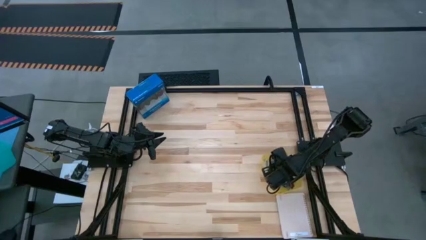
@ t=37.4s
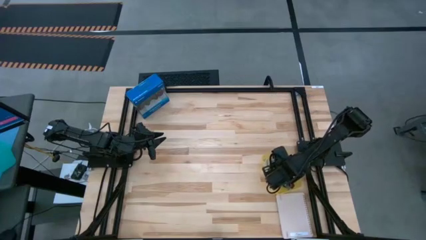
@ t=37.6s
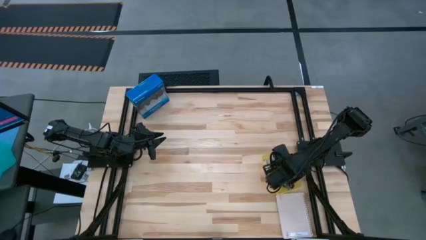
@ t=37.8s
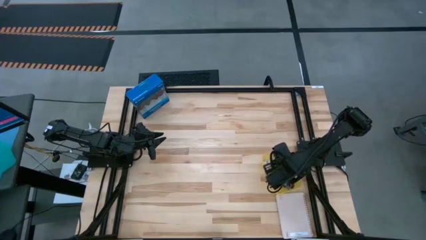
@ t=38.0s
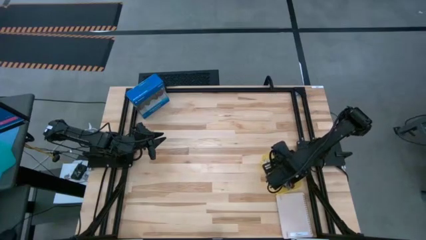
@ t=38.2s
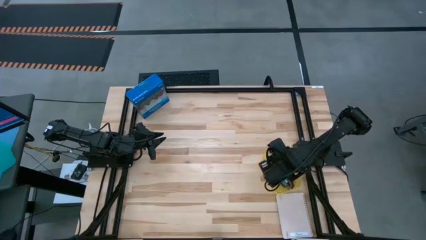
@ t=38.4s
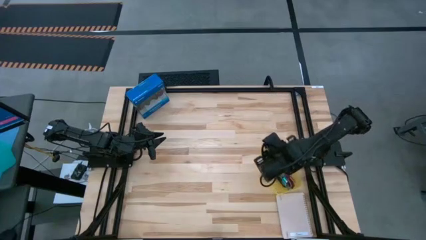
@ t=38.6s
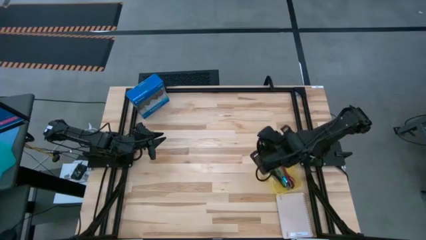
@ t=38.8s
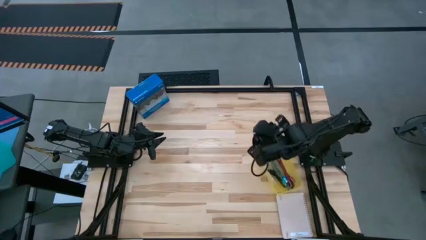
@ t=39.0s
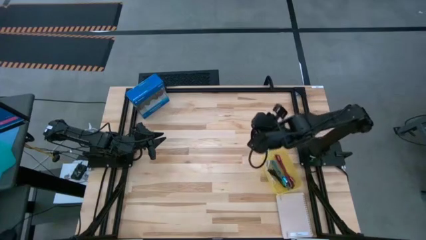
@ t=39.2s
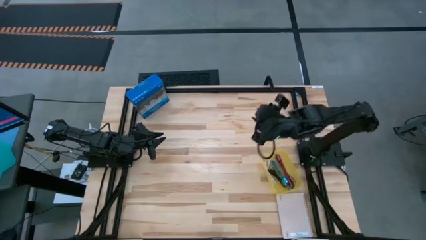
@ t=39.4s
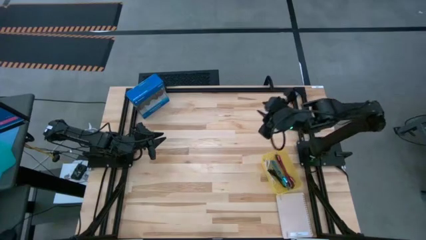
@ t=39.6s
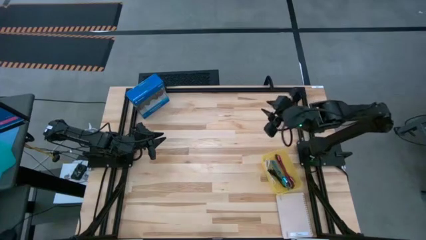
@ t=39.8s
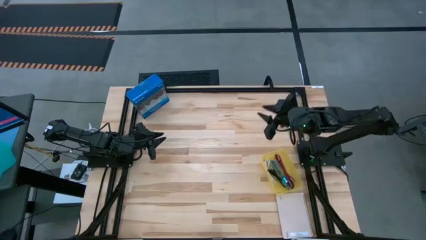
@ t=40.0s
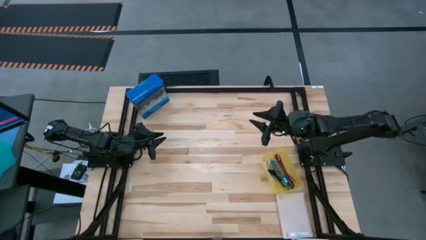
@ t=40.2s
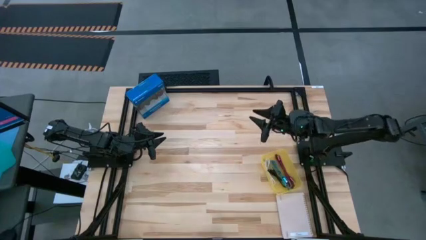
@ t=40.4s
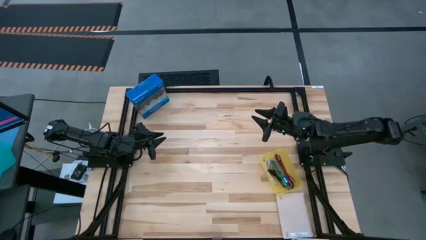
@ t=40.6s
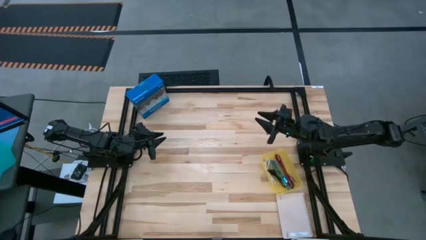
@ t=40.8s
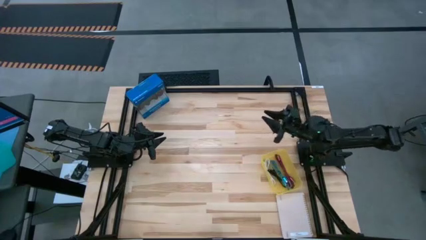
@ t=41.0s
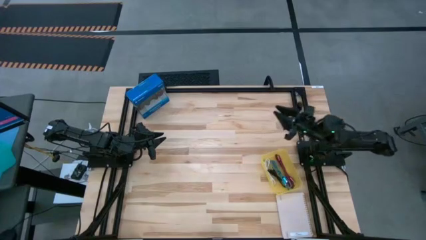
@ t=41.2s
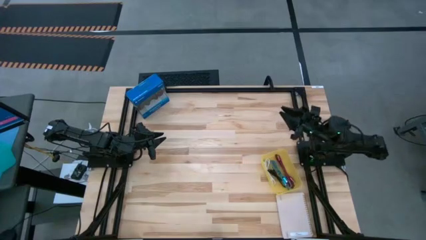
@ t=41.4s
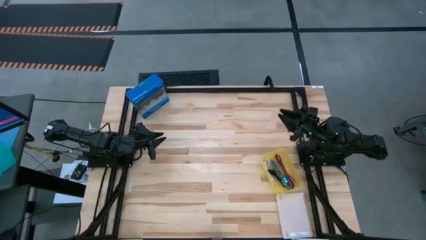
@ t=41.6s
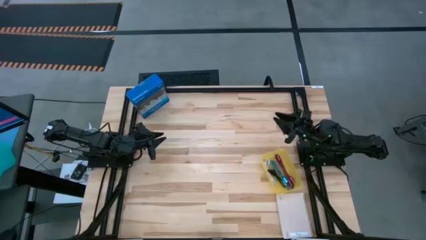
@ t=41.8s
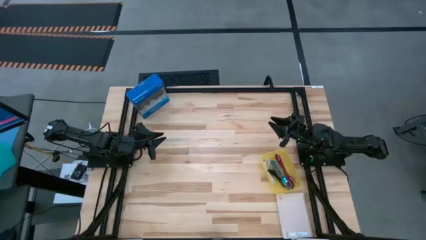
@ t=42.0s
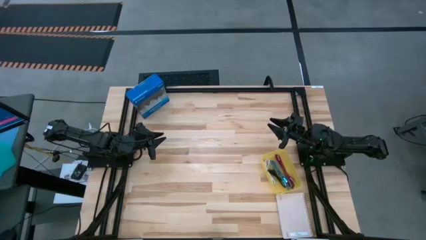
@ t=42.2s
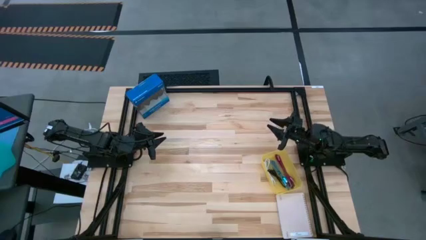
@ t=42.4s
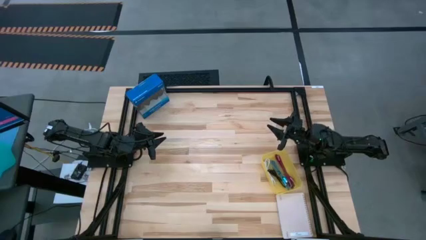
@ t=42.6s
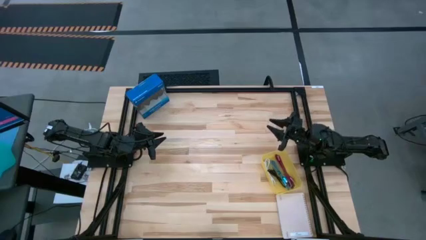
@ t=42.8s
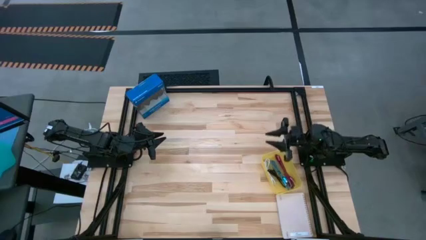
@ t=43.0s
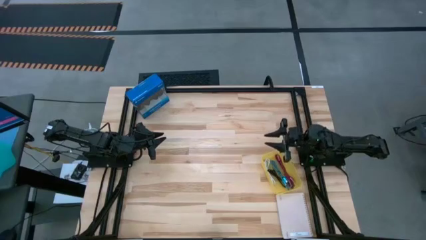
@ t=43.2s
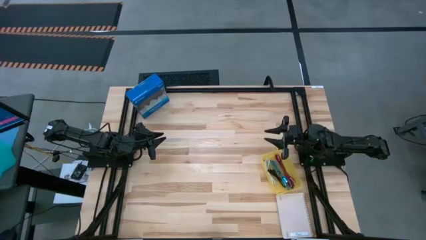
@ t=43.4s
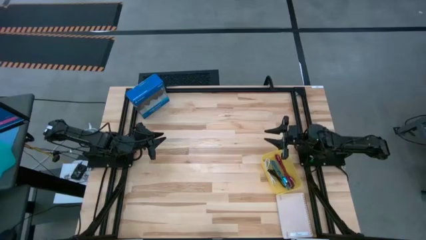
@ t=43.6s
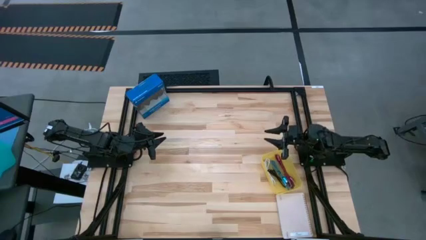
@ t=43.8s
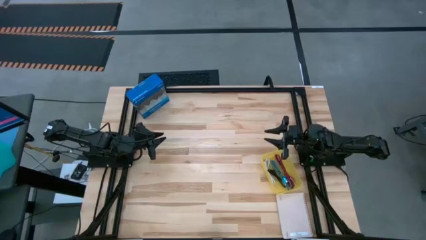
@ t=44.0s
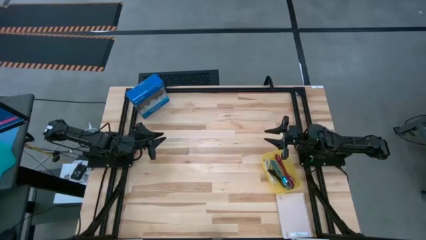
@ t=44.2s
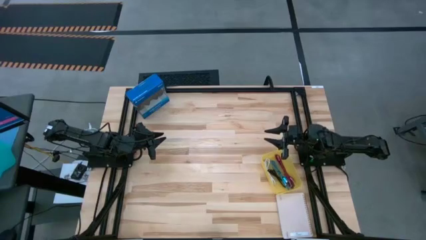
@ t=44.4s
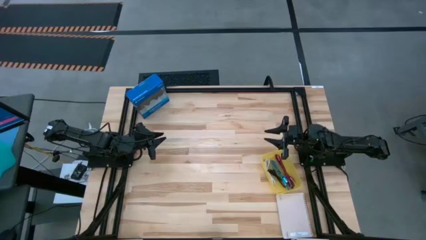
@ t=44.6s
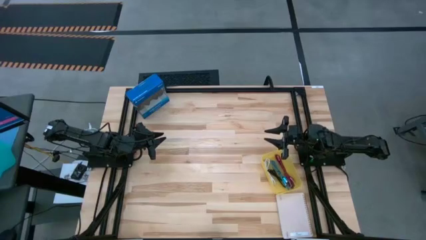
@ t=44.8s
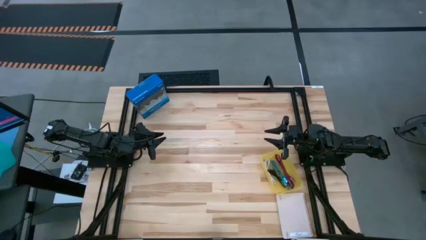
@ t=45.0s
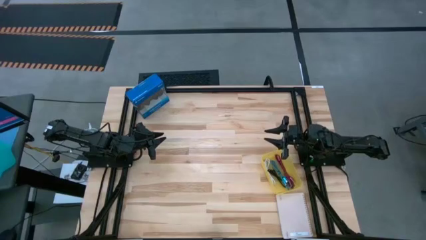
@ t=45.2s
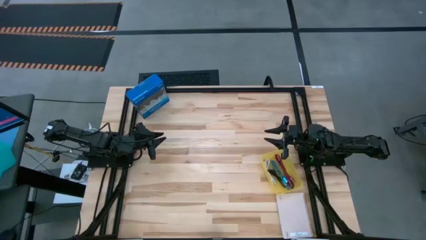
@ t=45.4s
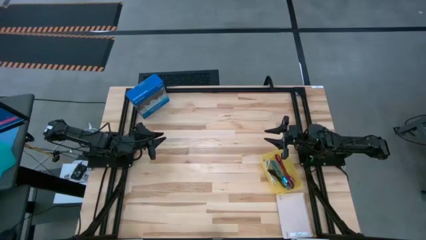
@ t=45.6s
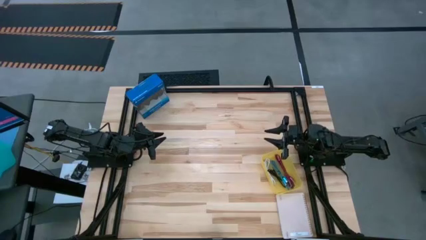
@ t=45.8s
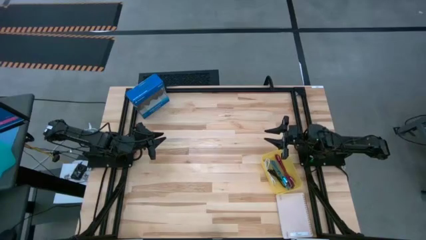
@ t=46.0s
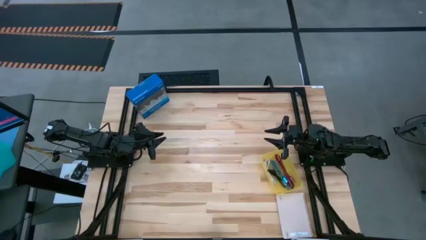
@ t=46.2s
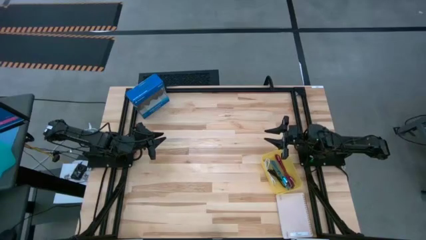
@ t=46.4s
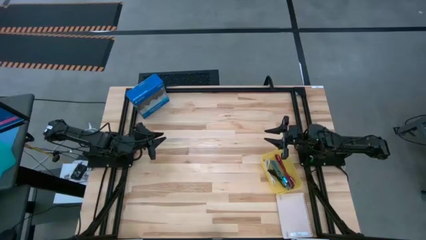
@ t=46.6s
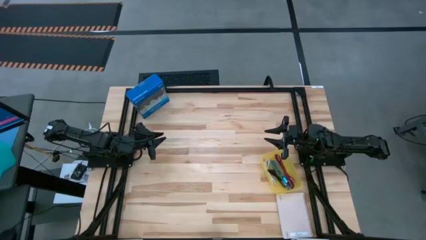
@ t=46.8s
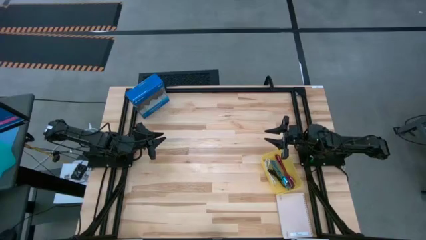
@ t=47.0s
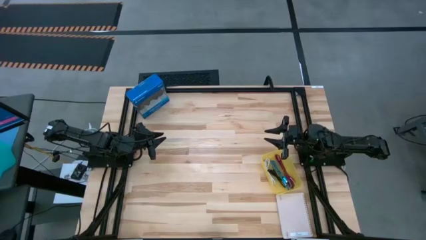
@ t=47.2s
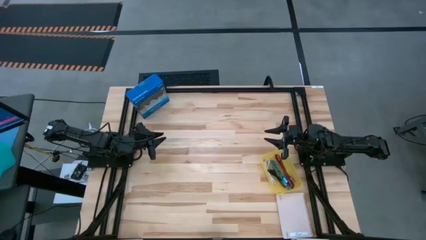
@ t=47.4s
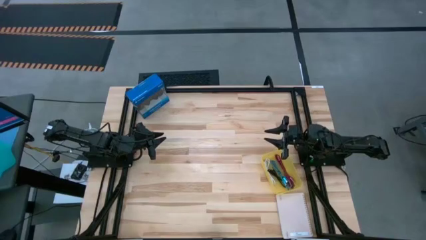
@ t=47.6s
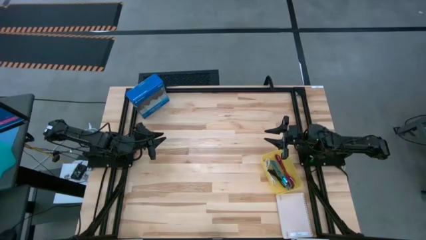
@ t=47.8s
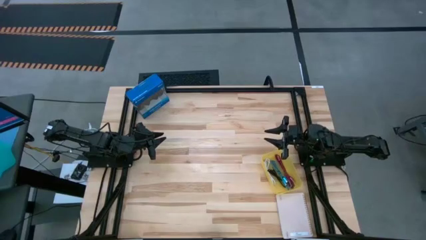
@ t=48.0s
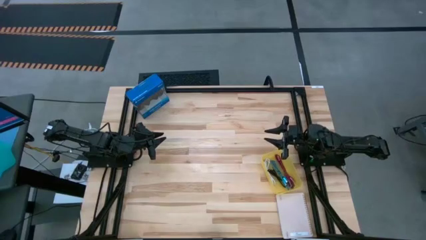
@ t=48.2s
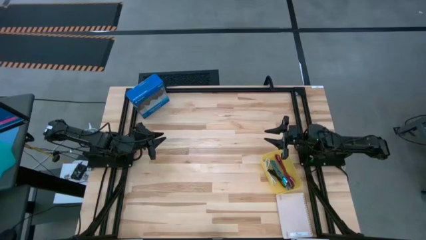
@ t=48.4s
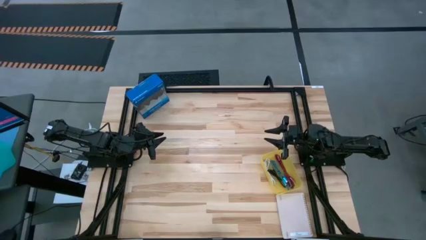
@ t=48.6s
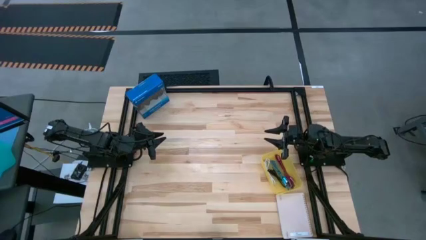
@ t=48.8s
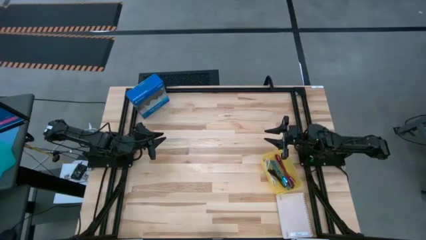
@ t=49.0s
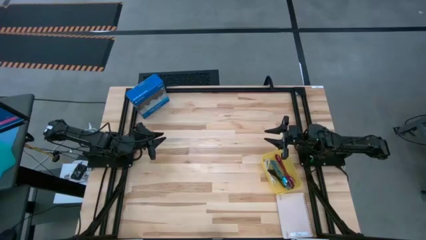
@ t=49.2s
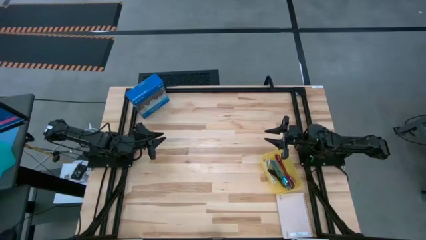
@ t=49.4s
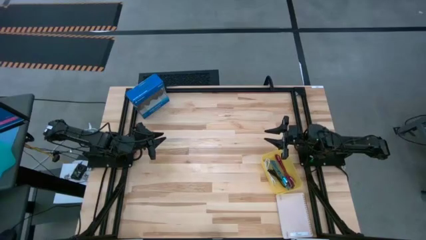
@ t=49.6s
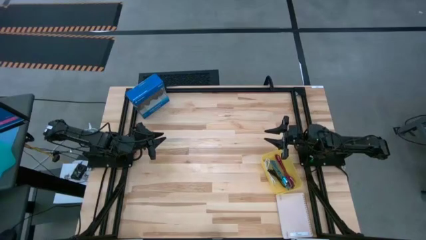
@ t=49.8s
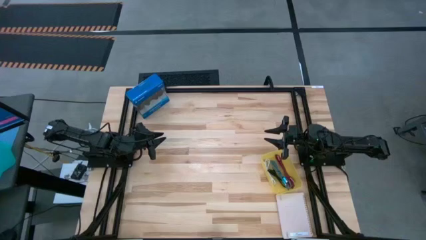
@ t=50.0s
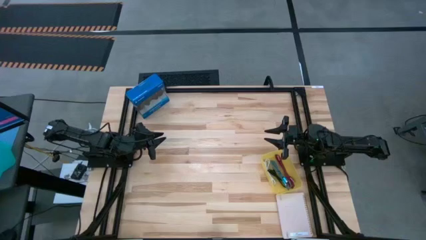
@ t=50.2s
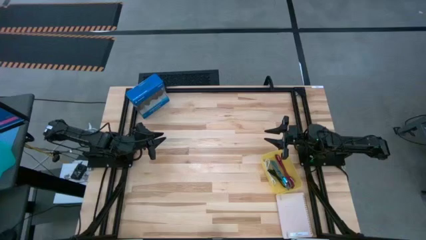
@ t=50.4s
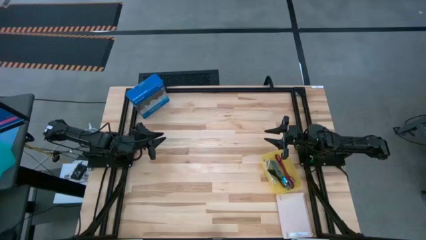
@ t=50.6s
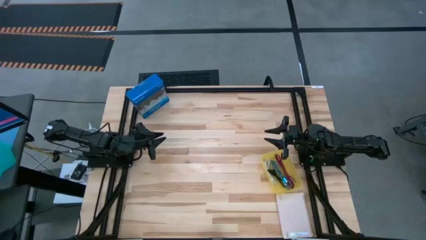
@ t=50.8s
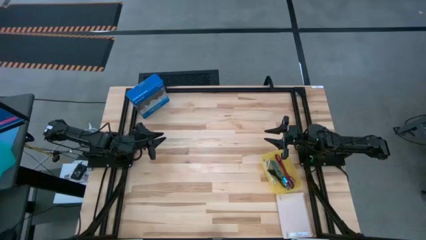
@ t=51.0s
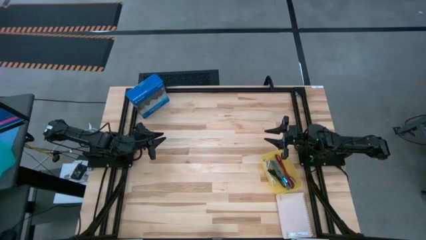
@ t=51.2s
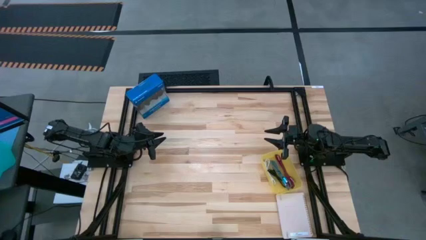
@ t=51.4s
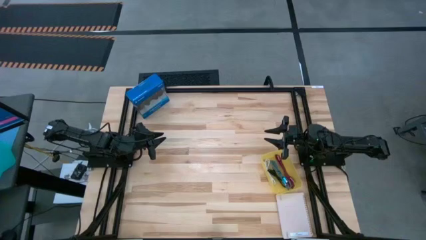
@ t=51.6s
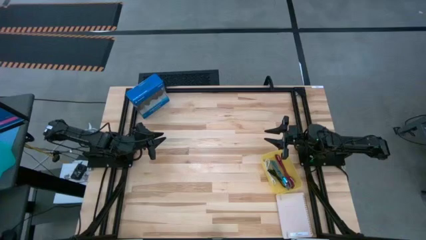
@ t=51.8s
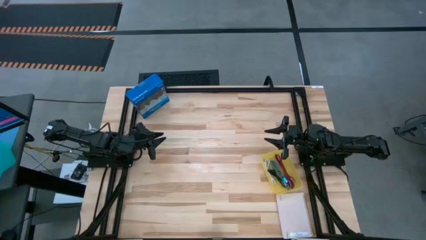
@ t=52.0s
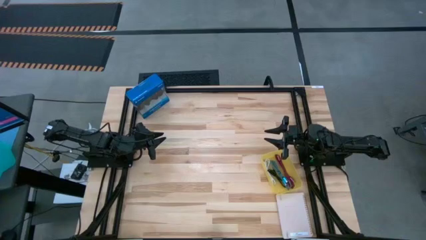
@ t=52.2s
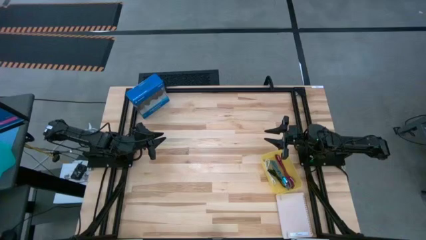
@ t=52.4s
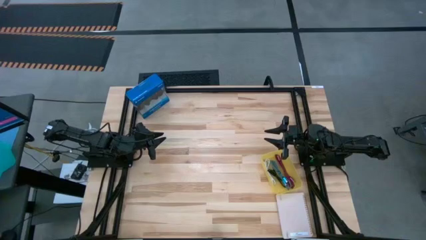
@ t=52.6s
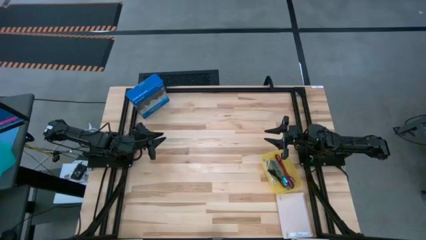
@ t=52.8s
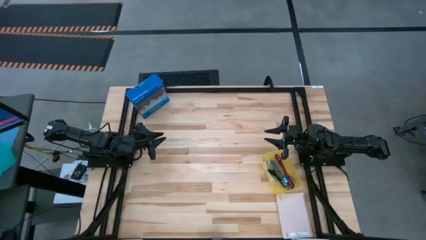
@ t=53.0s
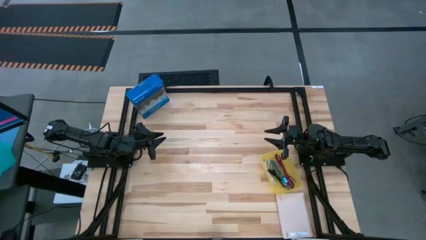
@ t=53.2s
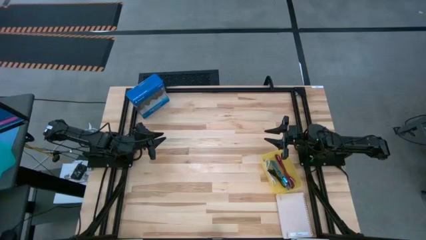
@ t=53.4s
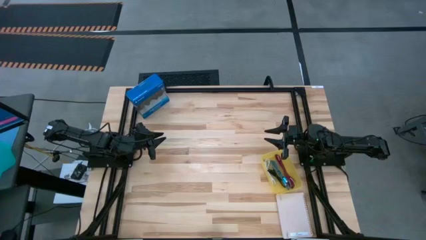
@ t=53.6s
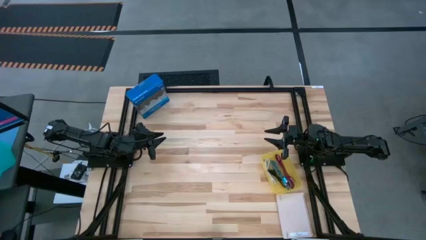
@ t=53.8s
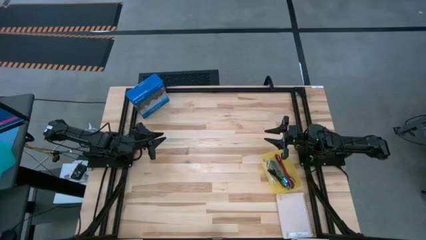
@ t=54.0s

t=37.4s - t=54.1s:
Task: Pick and place USB-C Cables
Return to Home Position
